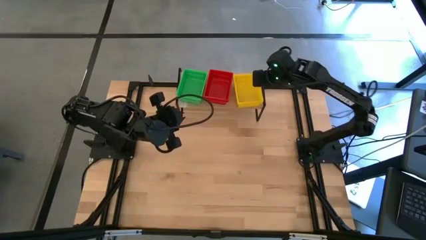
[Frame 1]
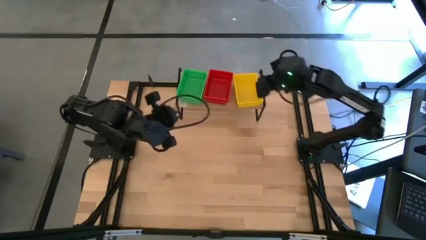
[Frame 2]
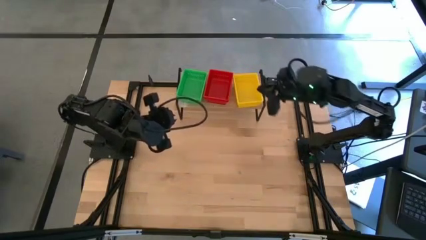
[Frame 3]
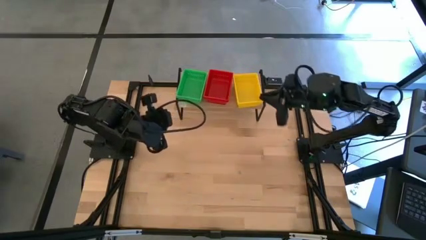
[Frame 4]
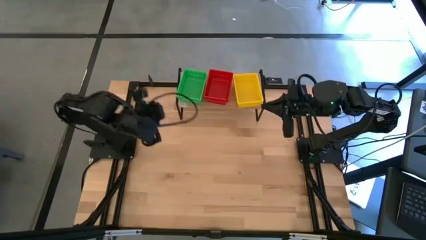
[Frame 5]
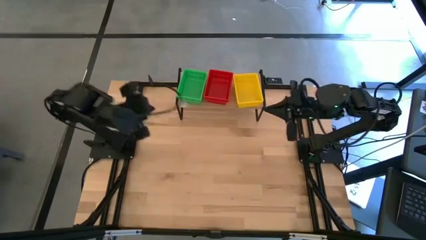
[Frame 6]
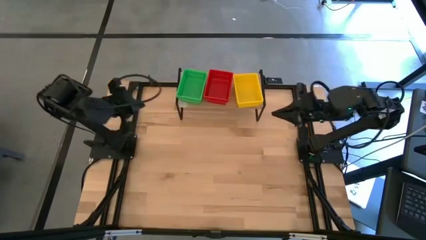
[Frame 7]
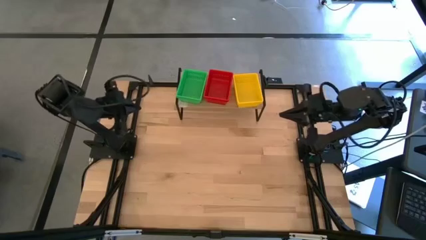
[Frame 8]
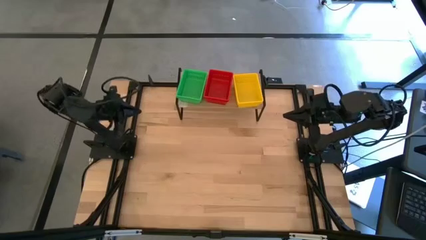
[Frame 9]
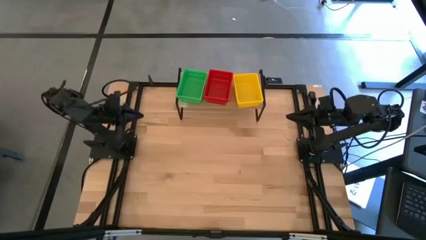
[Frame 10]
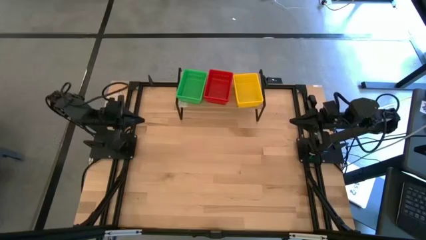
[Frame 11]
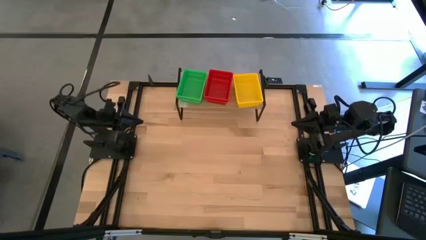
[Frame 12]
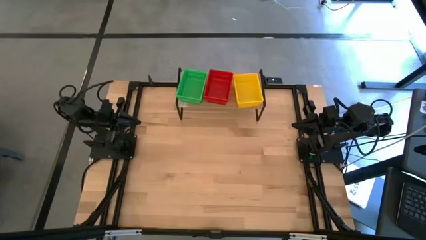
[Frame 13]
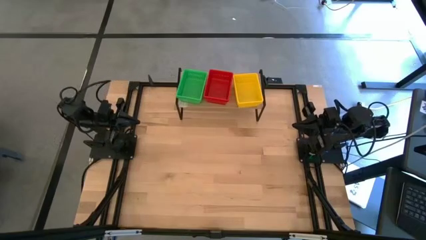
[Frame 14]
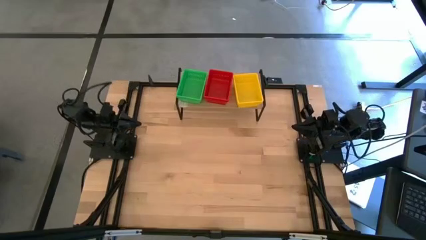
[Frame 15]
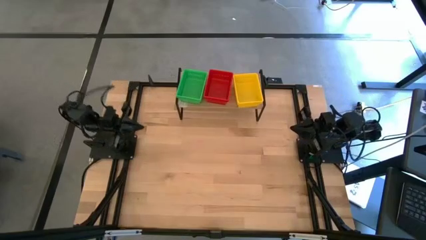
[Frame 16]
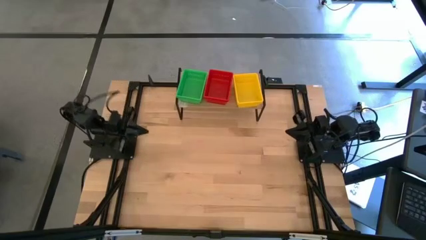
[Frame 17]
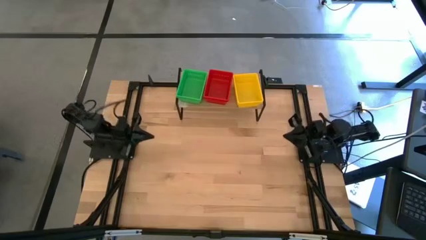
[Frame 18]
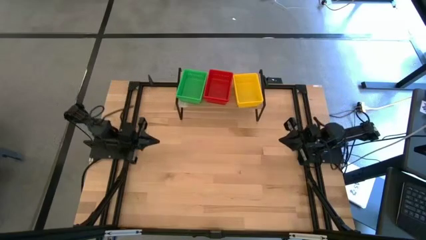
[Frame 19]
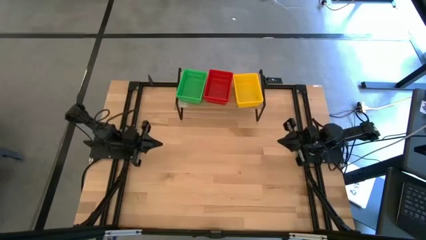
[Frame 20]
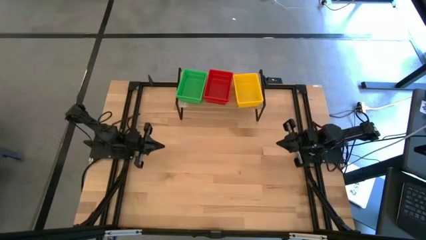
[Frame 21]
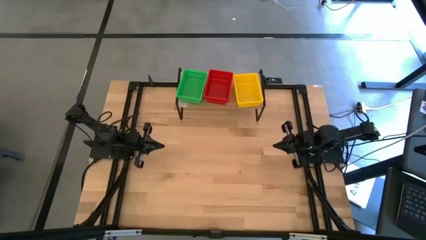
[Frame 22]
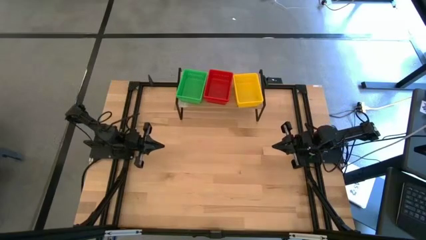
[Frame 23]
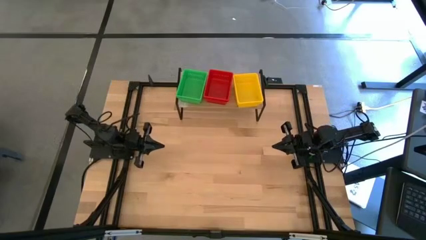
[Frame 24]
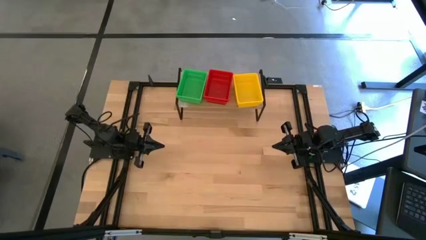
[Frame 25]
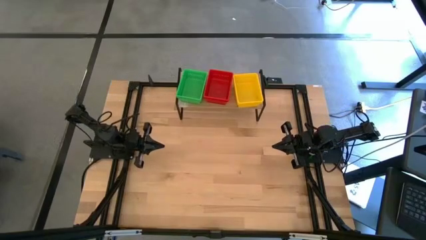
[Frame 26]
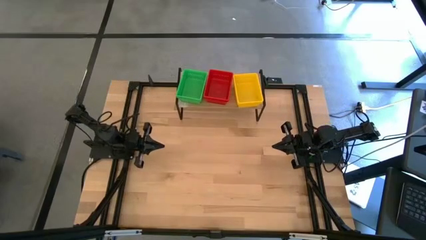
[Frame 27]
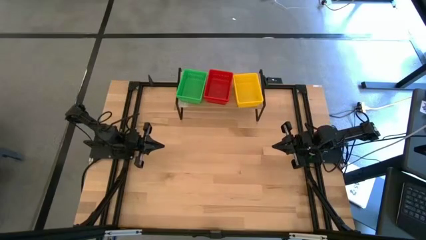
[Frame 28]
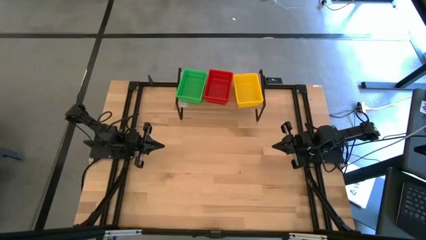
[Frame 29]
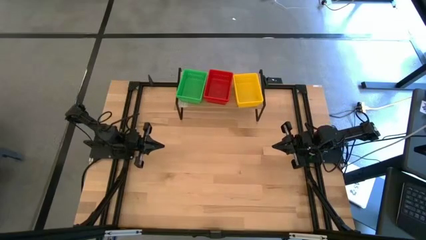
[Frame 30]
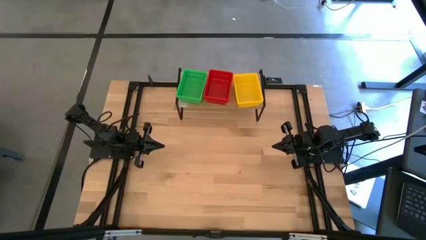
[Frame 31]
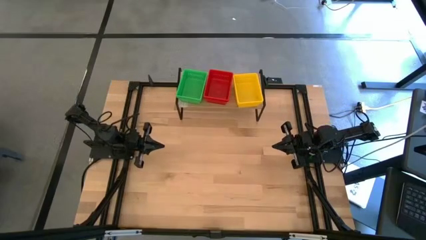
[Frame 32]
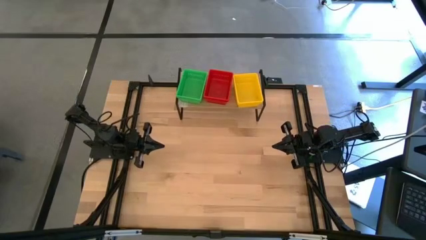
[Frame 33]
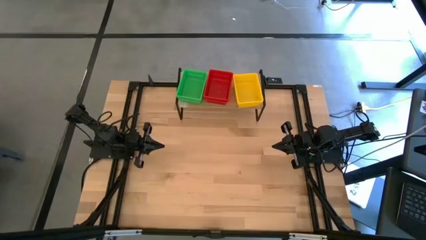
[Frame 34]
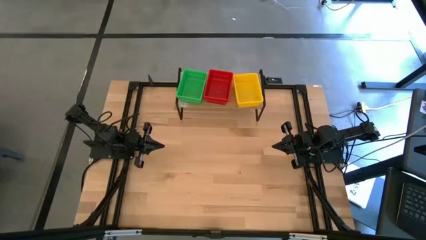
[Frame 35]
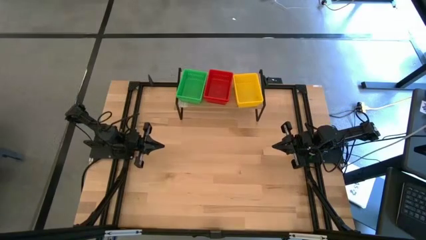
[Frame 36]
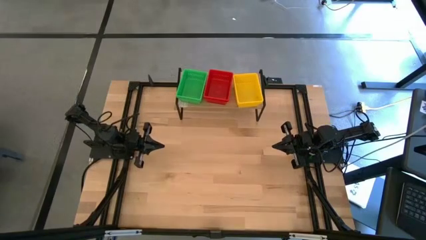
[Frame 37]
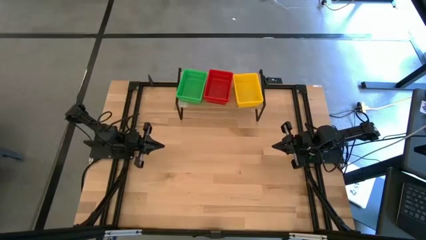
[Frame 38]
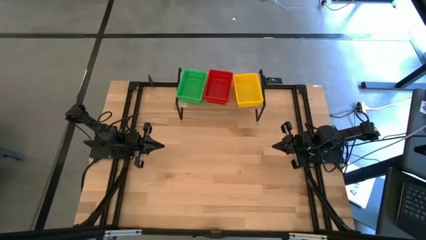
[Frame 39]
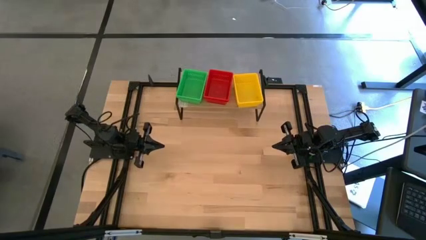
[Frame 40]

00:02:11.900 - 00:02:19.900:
Task: Stack baskets on shelf by color
Return to Home Position

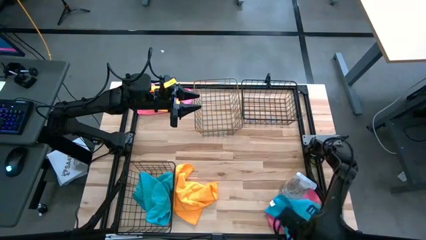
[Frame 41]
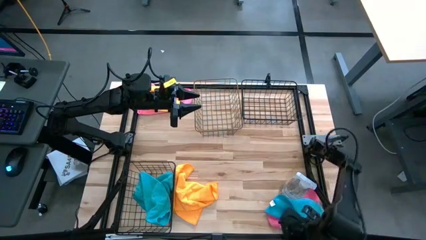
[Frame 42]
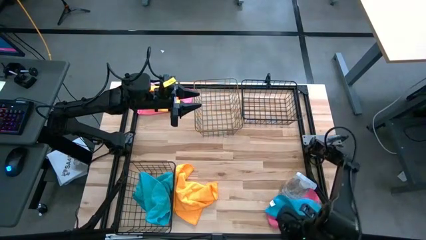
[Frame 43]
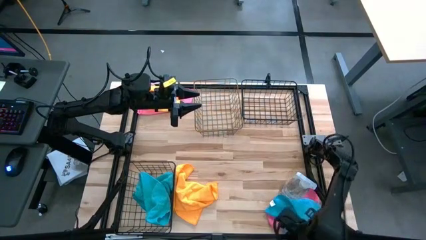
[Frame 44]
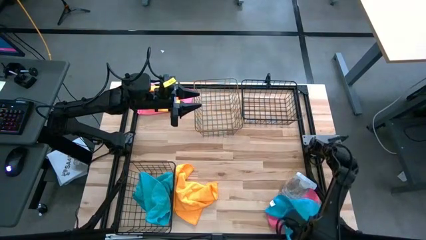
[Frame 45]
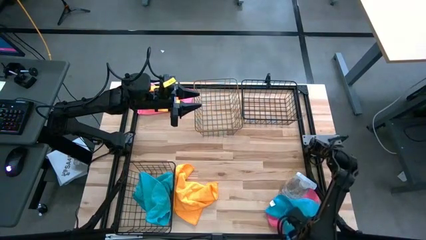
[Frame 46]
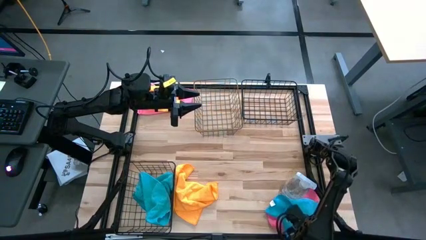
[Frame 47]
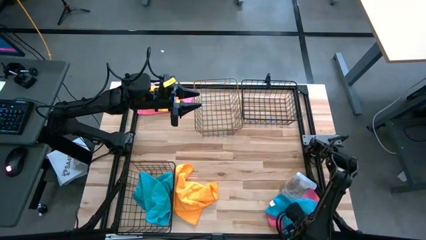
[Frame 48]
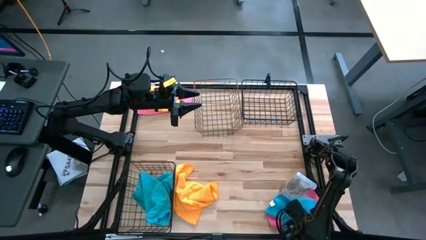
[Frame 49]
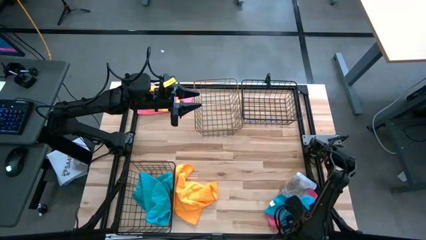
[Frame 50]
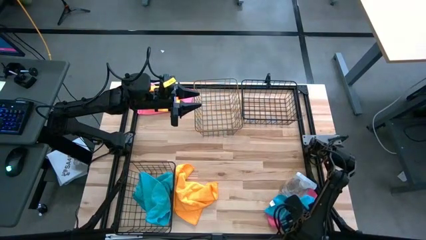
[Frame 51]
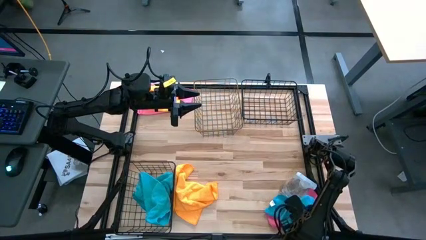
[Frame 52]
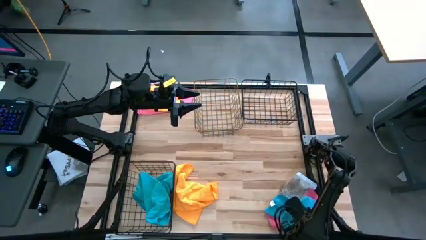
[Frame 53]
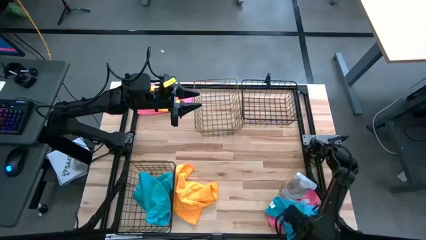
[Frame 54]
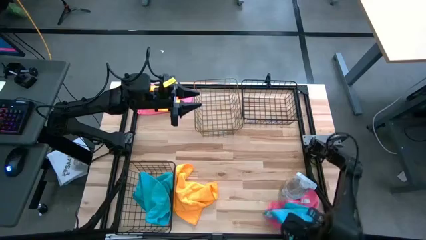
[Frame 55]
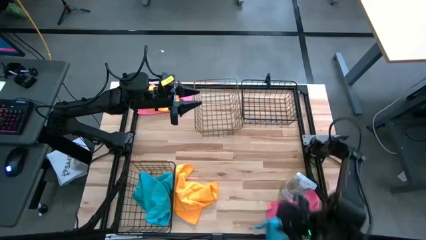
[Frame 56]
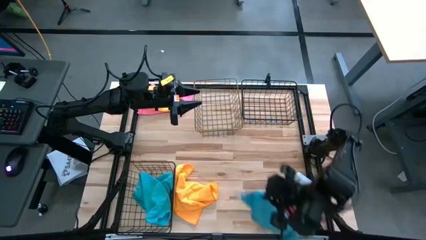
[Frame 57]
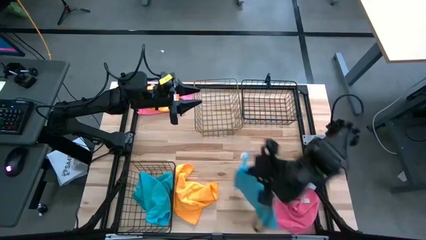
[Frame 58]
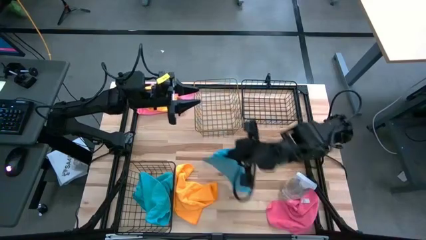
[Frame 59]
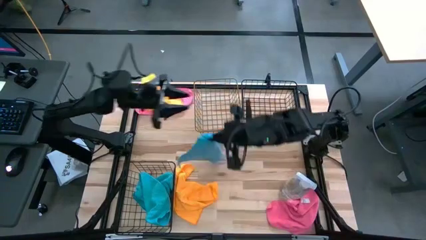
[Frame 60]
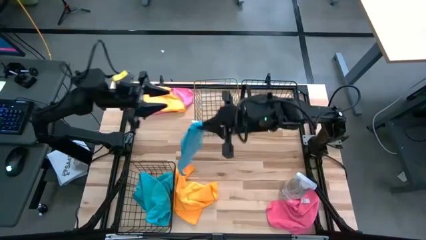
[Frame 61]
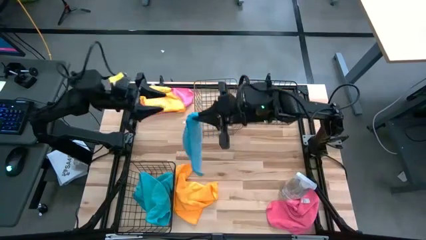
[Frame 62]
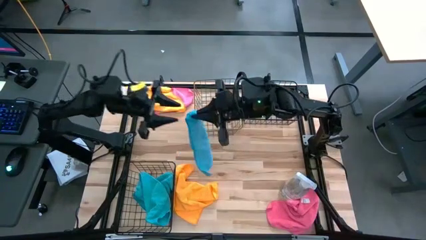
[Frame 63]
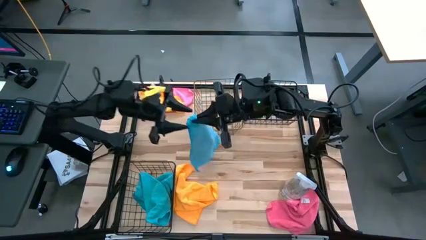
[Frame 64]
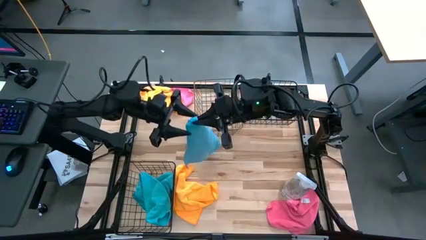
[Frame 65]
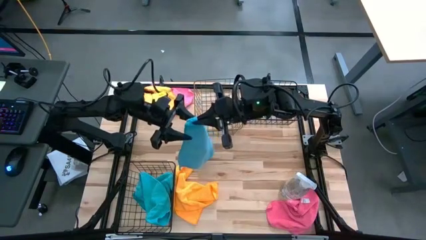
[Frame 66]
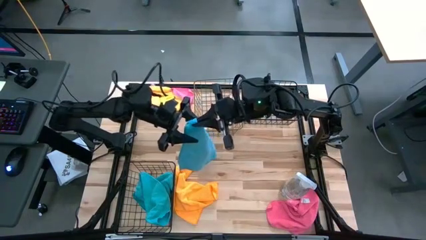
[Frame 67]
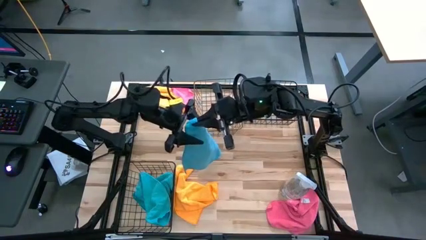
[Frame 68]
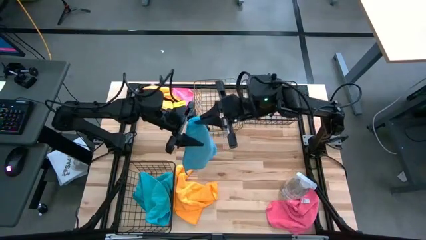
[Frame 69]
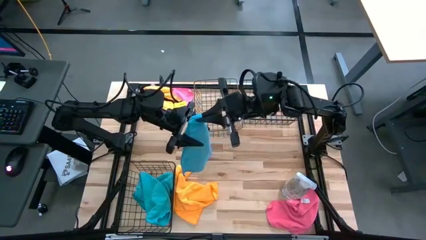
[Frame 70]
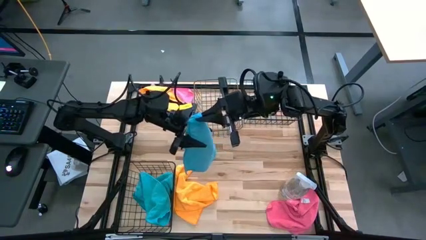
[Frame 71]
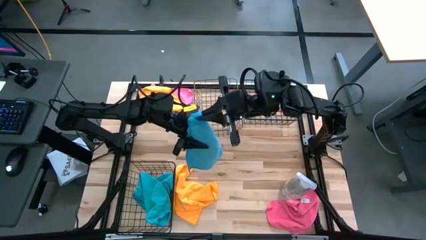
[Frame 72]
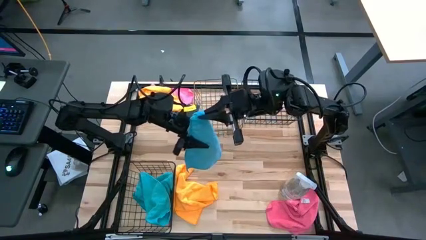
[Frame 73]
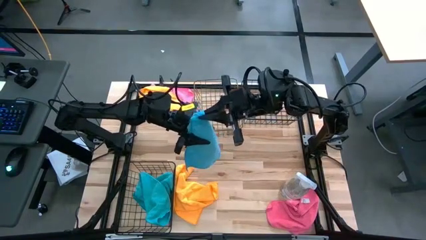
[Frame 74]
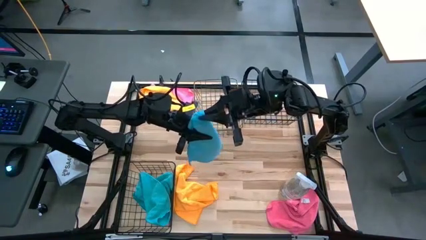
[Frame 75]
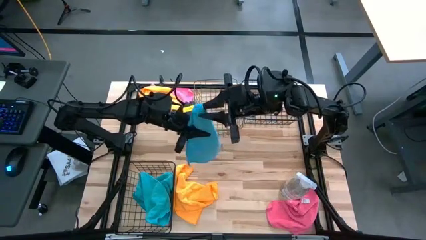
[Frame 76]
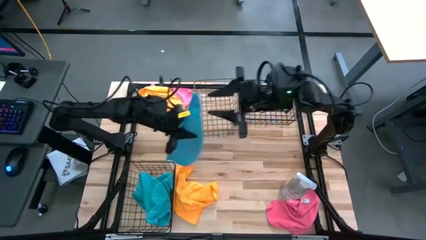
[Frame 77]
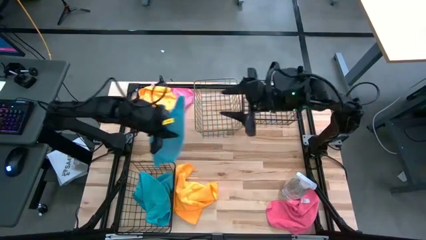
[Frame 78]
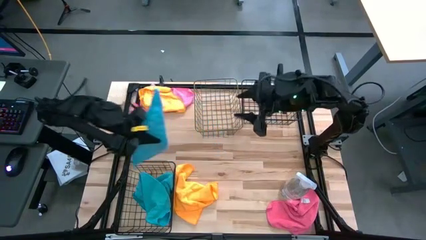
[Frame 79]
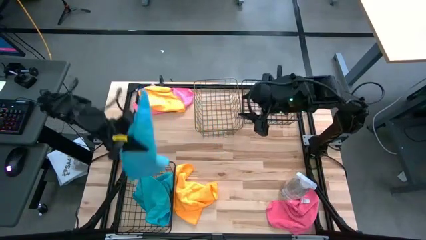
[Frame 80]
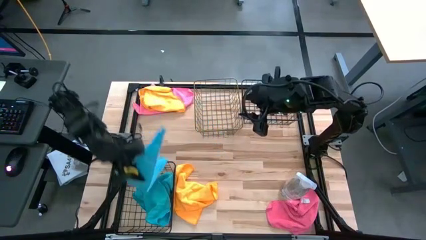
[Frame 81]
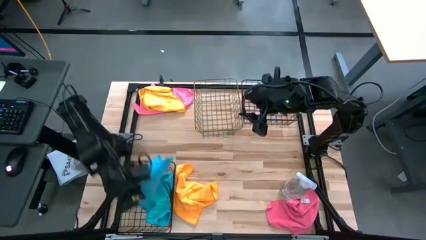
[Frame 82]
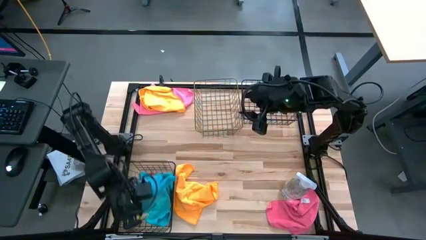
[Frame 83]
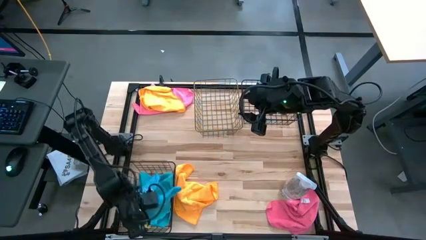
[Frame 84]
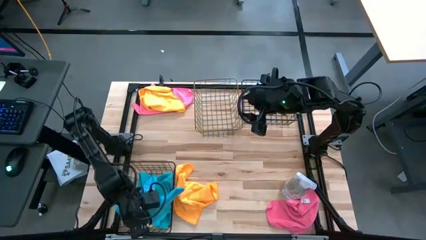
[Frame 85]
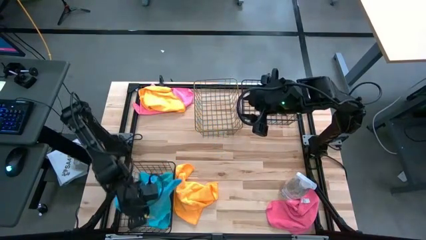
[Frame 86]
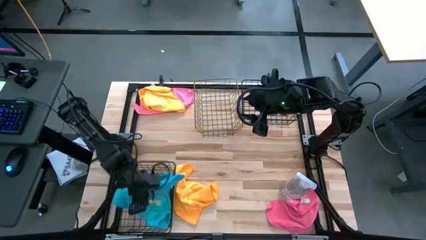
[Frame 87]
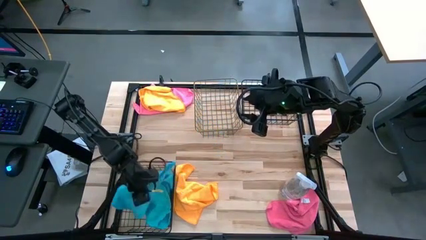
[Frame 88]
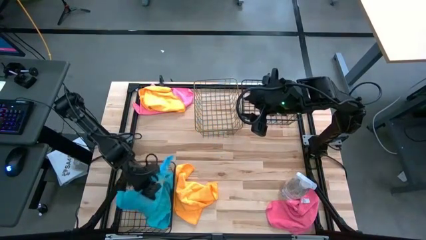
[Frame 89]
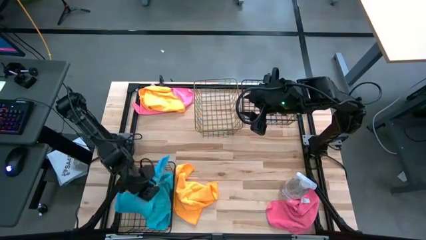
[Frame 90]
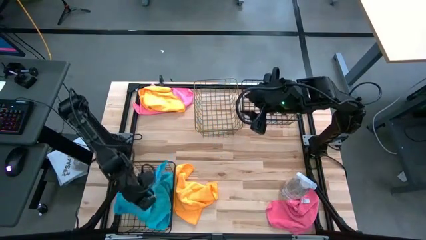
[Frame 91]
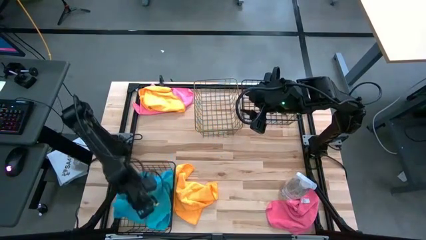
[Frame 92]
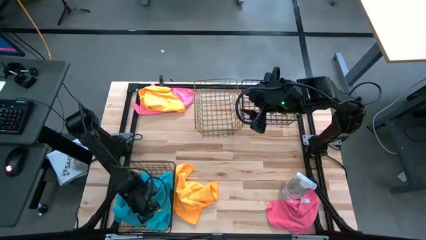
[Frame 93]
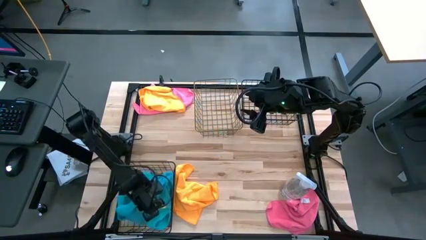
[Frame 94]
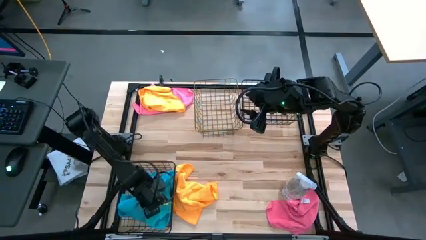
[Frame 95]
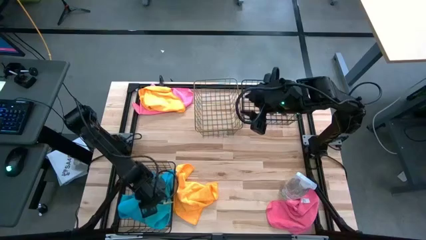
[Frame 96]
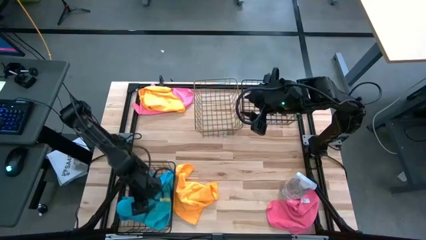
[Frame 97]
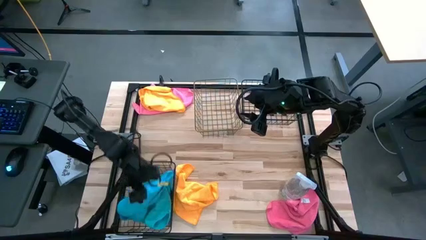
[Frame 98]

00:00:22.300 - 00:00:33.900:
Task: Sort microfiber towel by color & place in baskets
Put the blue towel into the bottom black wire basket
